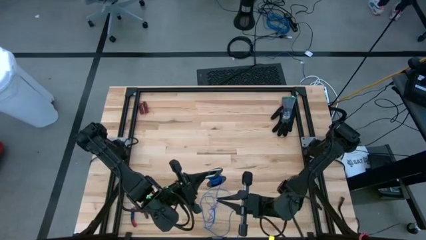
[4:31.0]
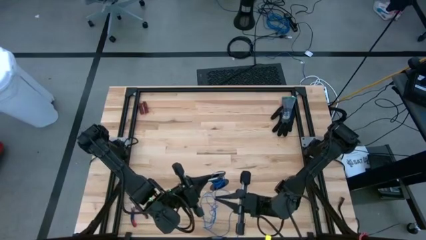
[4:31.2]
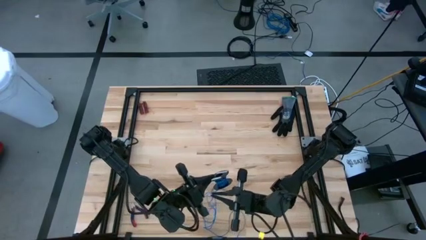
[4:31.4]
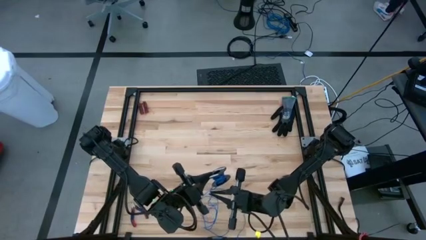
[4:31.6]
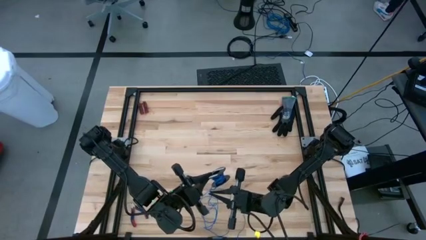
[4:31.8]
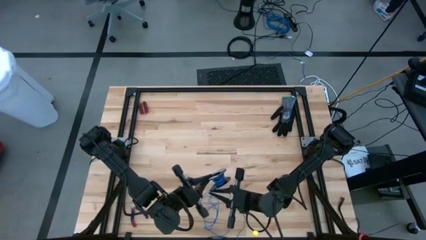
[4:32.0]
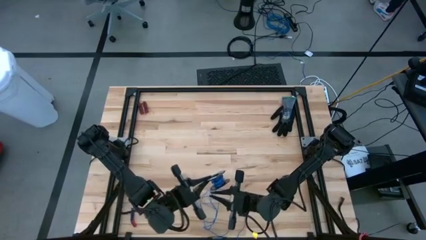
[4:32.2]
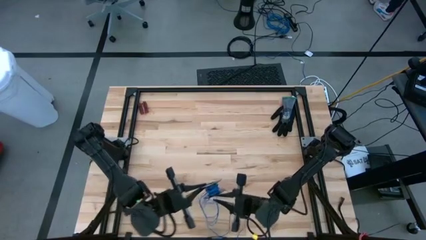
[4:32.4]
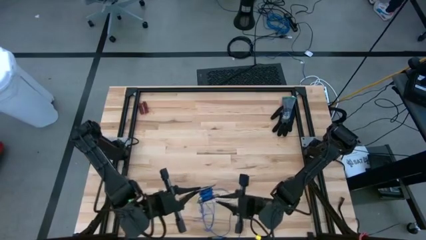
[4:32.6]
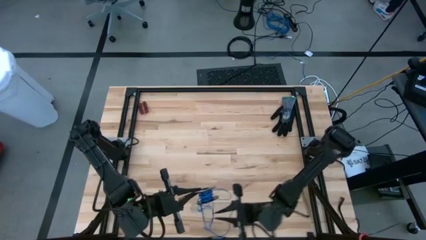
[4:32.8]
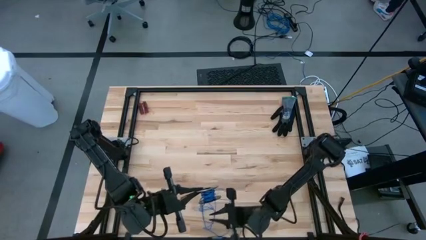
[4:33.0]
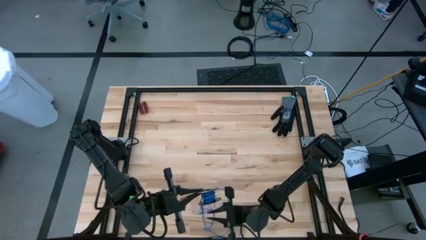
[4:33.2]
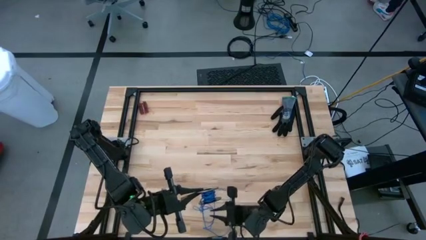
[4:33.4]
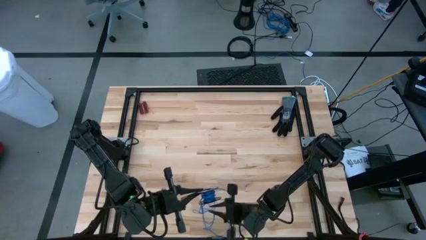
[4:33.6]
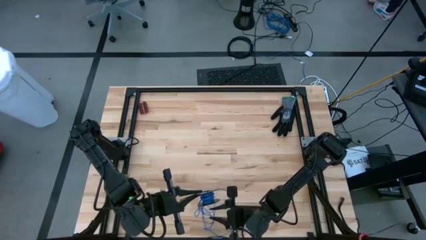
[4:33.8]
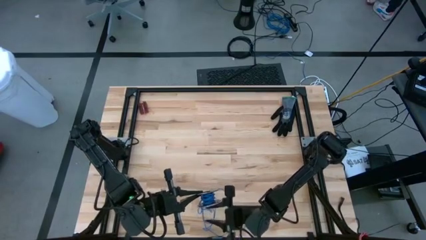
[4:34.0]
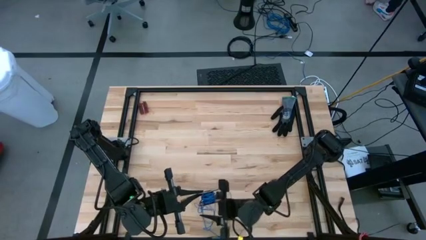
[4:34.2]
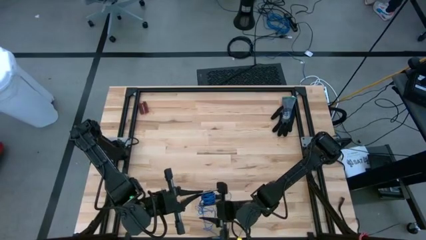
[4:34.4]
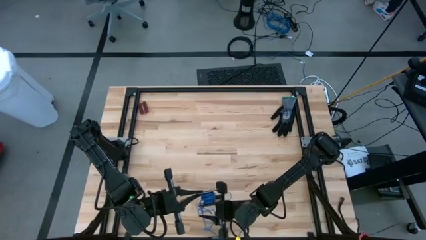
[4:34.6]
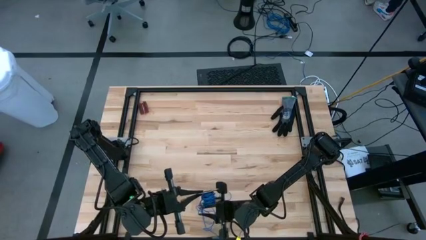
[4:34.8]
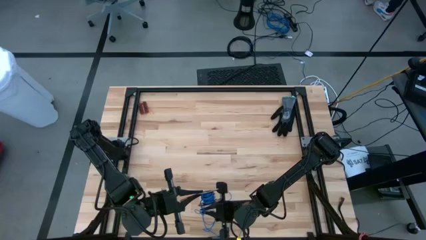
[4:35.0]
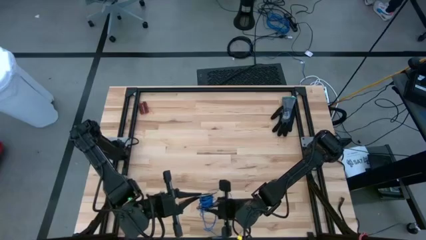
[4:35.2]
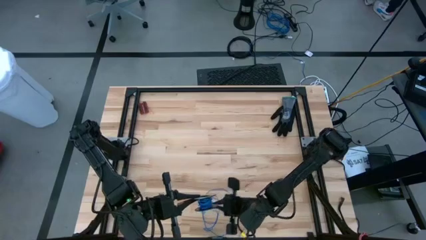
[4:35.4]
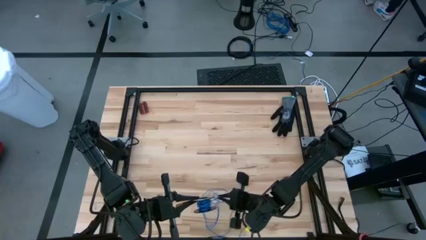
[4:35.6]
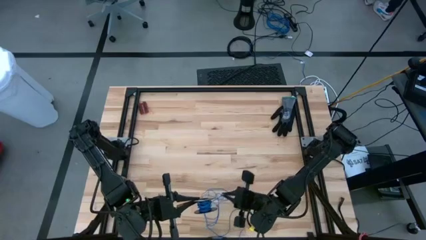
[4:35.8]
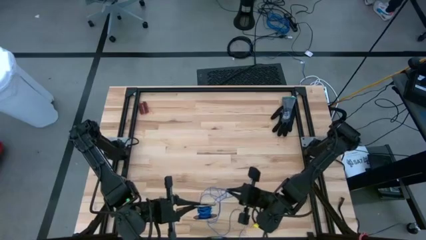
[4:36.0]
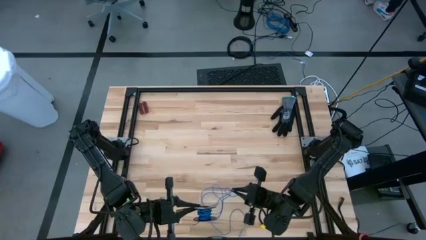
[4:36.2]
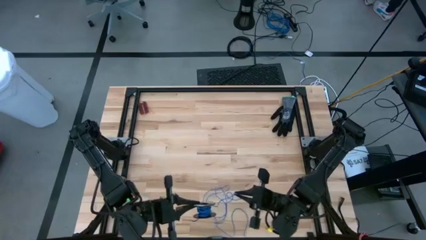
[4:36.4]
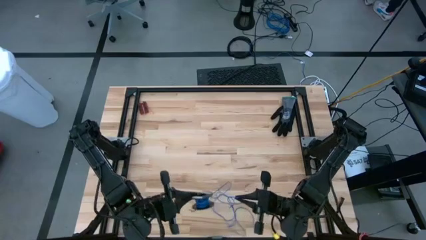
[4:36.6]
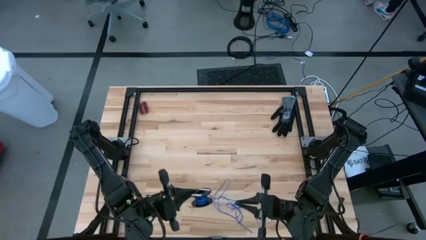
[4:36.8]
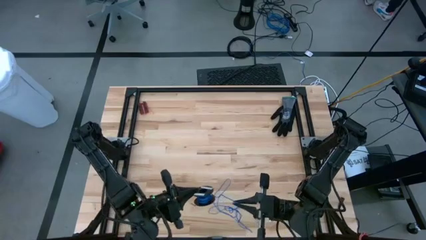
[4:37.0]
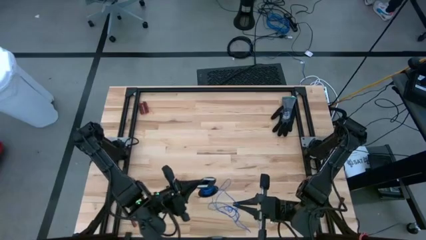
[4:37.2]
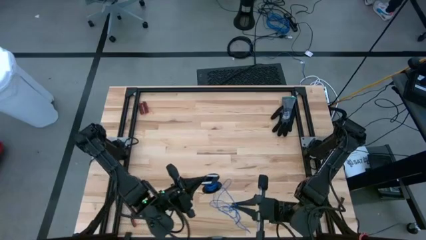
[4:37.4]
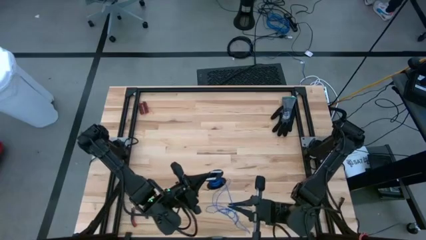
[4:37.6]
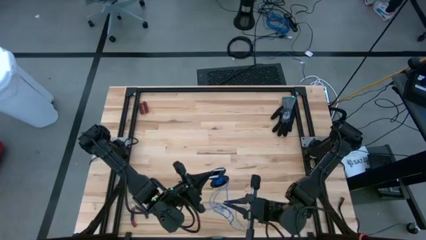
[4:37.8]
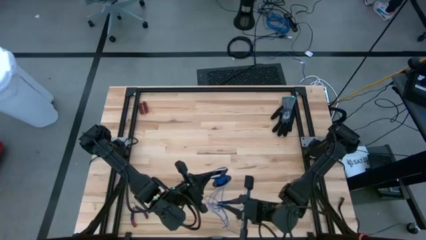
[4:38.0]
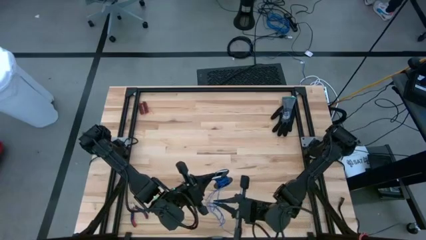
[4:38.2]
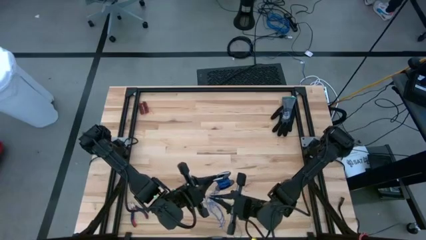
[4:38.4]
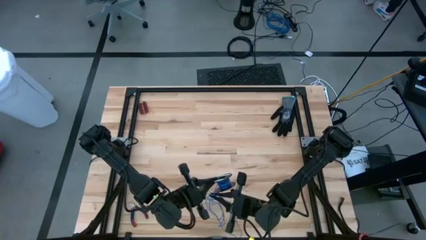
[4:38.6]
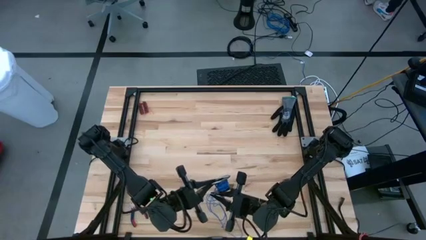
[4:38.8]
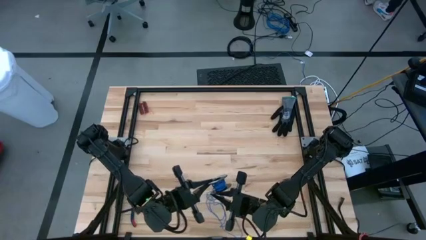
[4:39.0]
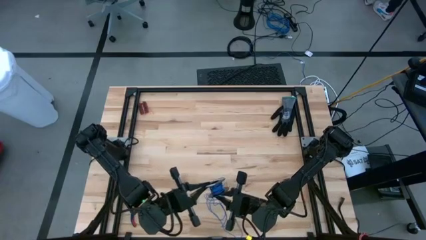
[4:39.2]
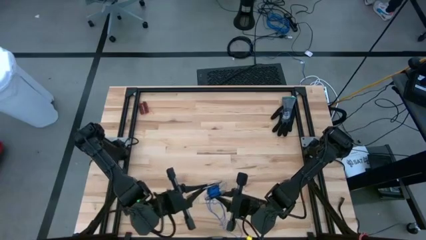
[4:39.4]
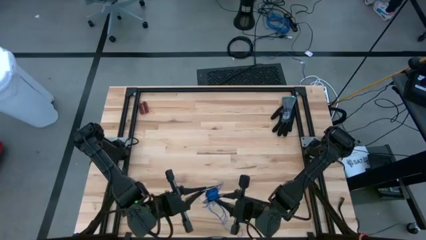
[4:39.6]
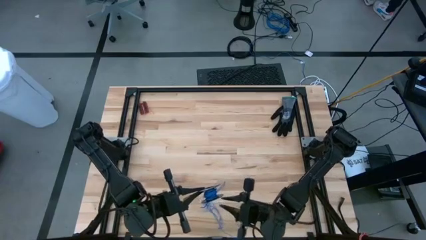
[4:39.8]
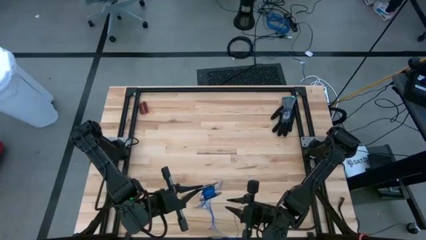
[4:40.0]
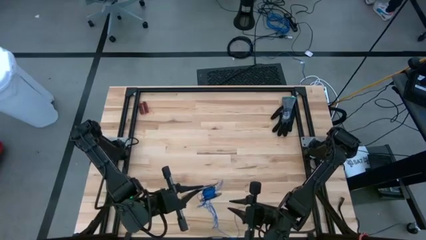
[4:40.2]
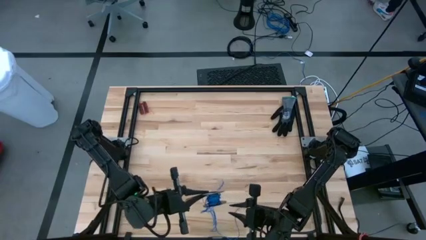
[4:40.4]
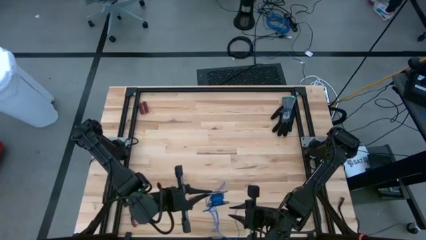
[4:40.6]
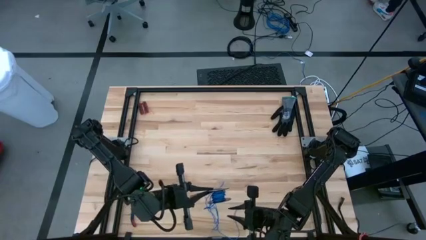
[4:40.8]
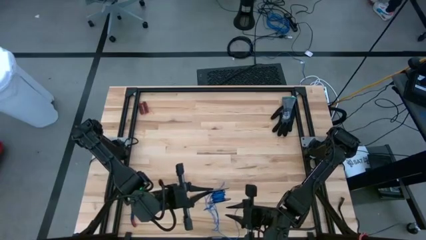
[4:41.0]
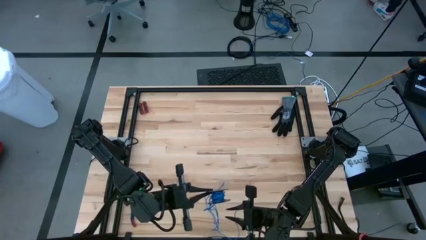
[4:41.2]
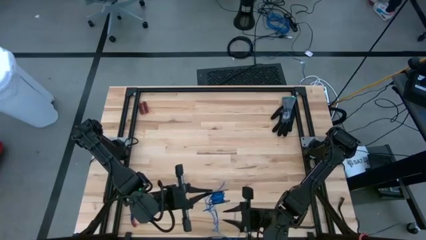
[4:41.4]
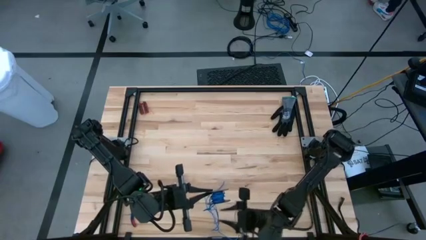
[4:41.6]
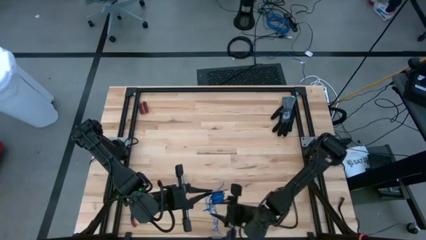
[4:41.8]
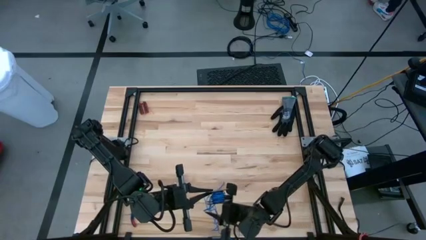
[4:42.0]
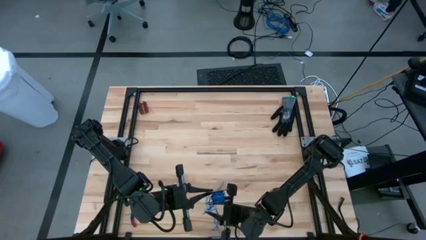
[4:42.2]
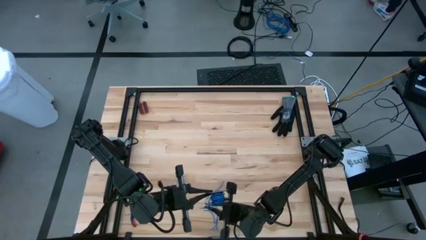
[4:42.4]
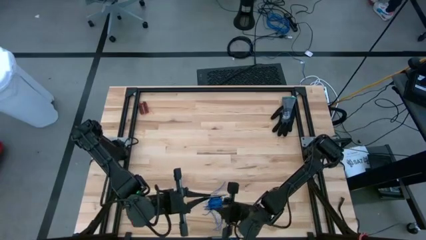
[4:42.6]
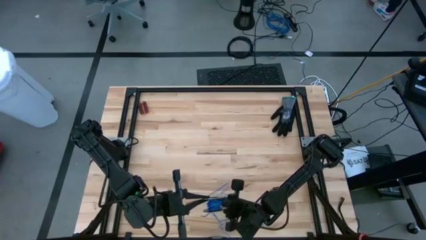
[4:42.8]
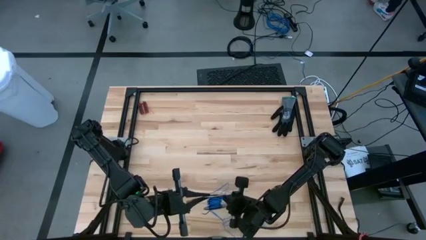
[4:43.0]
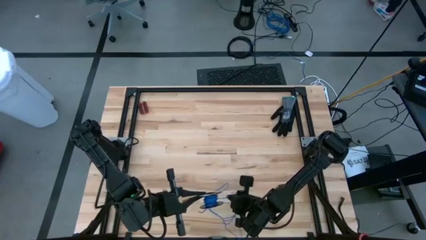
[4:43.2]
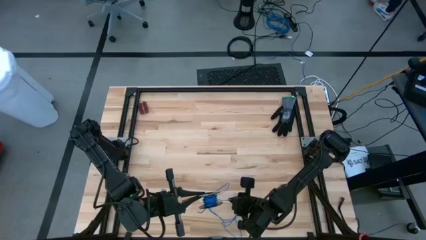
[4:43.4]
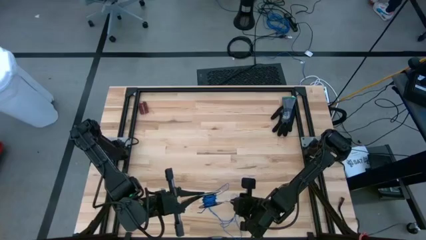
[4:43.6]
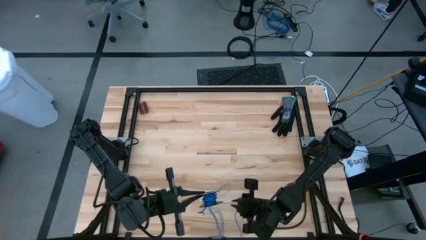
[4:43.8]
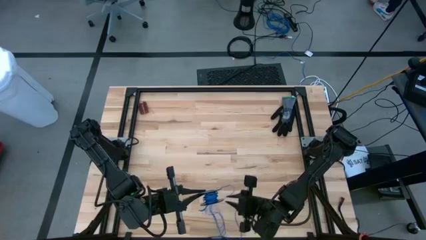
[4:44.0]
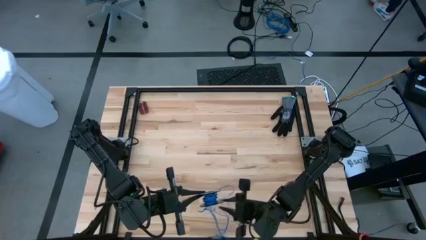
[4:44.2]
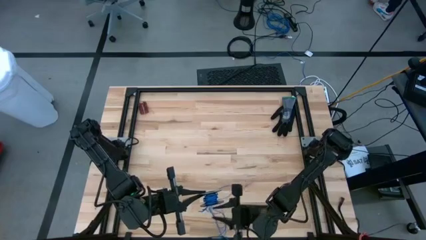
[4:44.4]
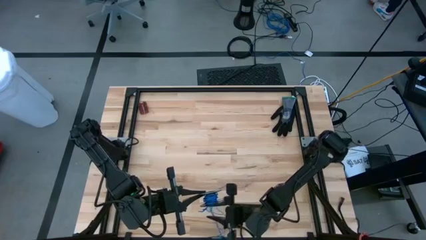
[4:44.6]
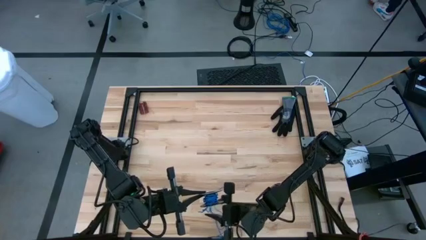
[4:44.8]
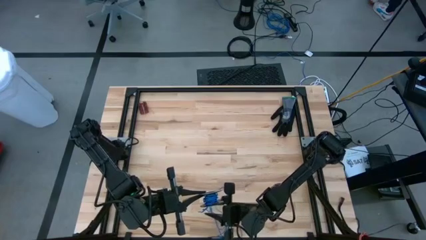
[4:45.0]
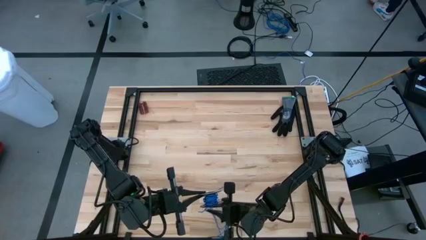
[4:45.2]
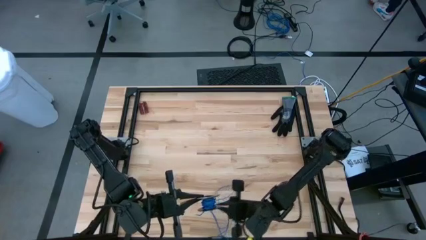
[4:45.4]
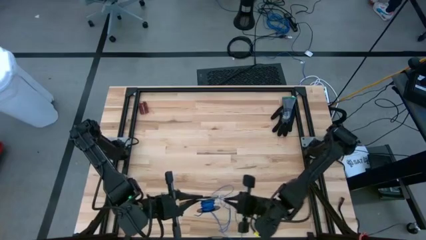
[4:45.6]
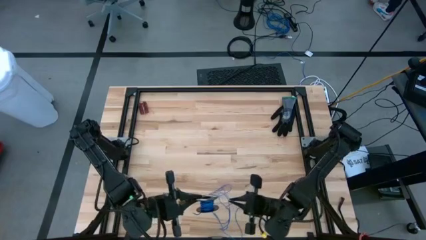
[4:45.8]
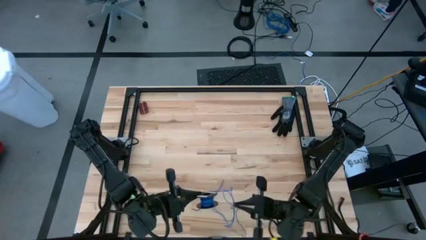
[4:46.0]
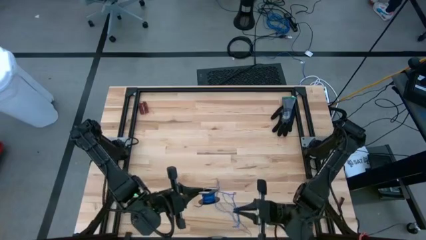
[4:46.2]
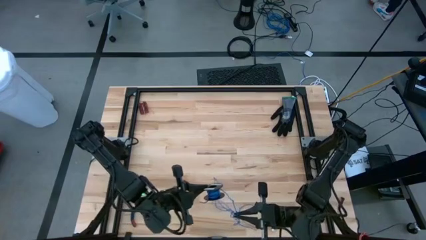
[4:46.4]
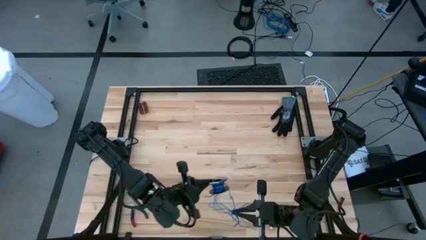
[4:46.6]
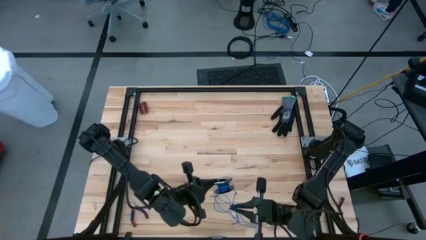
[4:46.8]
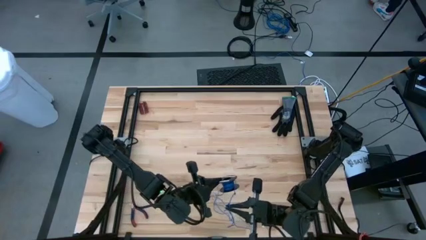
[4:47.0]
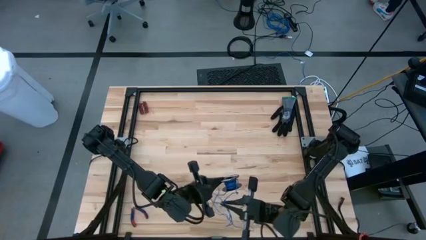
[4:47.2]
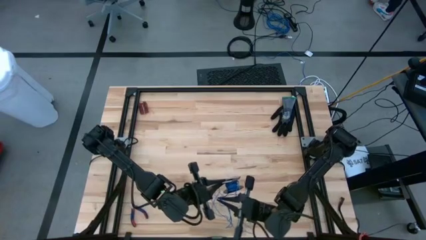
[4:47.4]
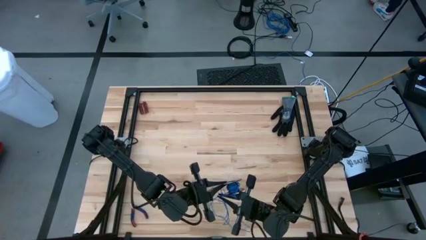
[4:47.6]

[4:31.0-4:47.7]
Task: Coil cords
Coil the blue wire onto a spool
